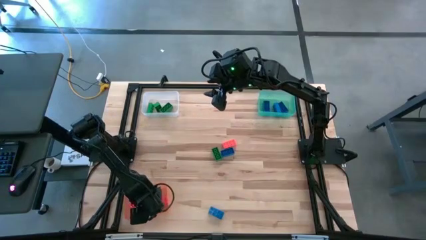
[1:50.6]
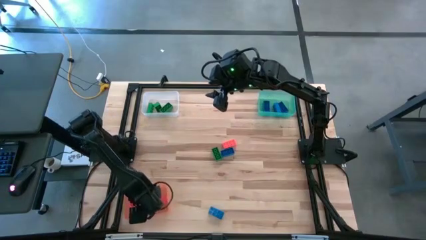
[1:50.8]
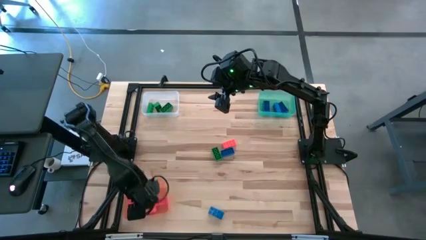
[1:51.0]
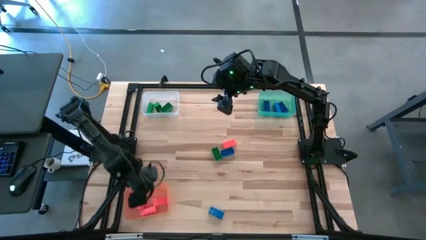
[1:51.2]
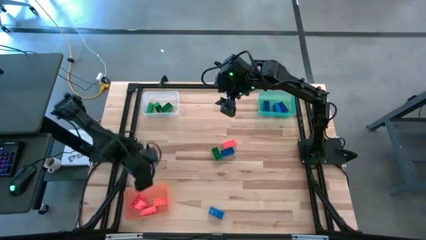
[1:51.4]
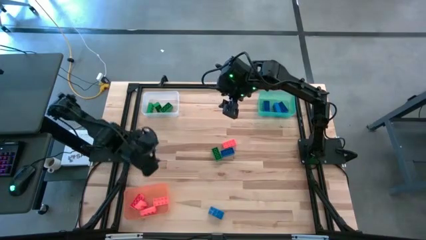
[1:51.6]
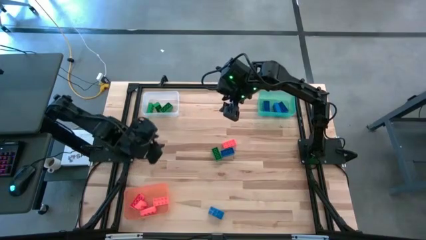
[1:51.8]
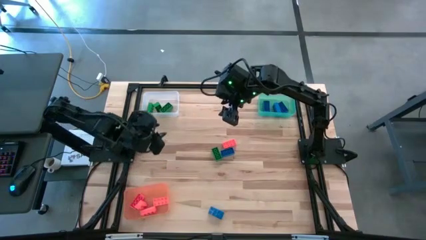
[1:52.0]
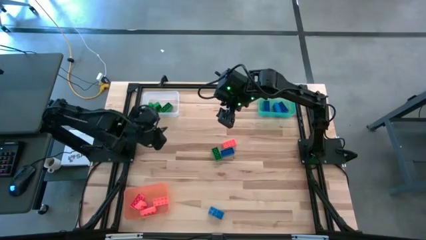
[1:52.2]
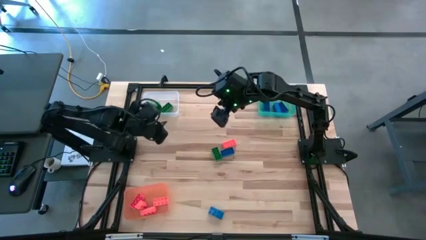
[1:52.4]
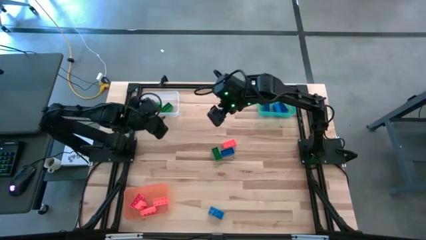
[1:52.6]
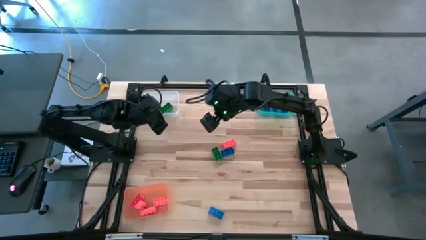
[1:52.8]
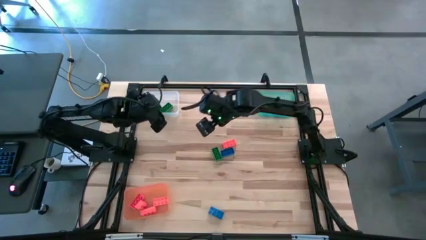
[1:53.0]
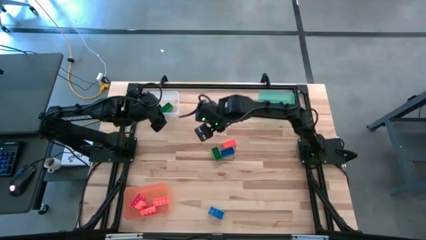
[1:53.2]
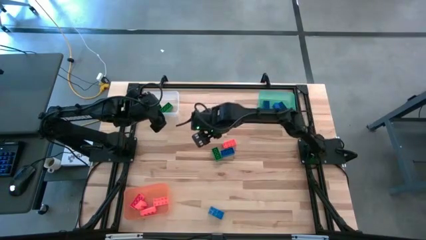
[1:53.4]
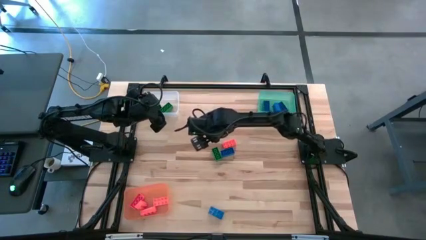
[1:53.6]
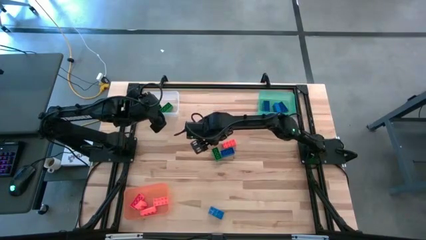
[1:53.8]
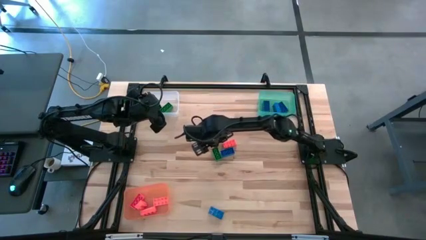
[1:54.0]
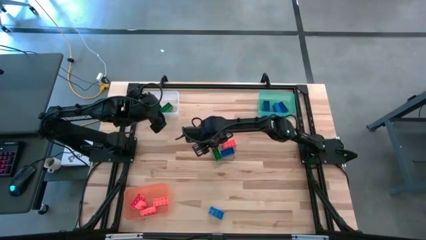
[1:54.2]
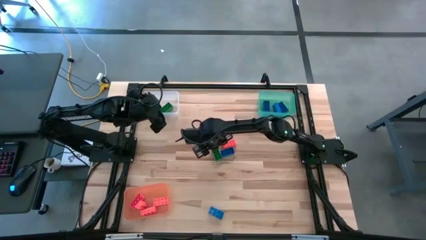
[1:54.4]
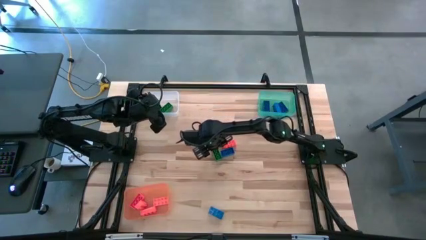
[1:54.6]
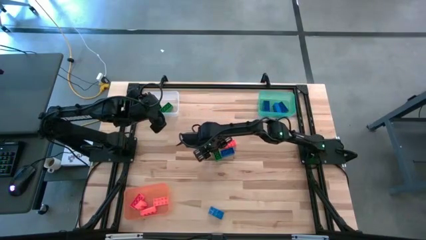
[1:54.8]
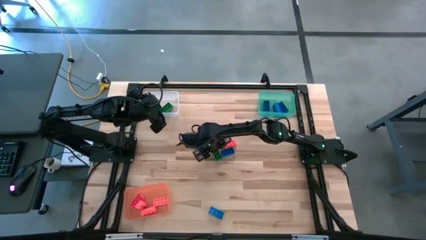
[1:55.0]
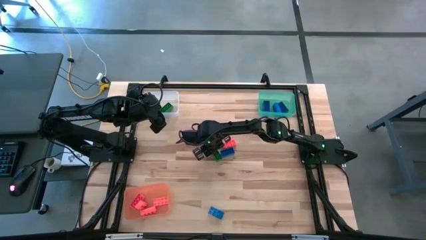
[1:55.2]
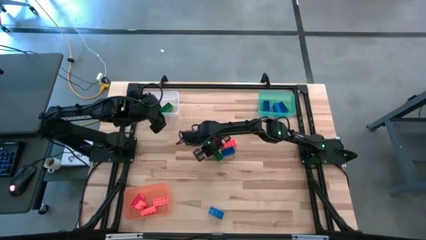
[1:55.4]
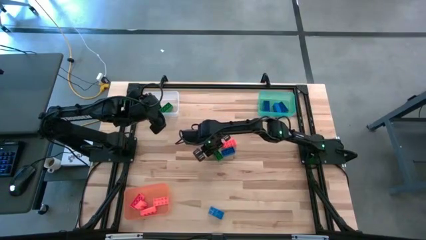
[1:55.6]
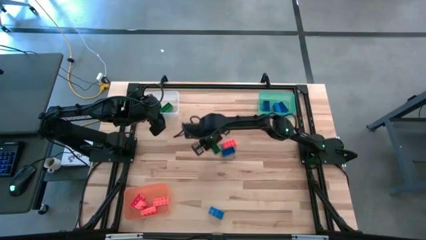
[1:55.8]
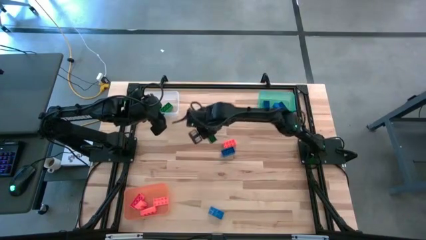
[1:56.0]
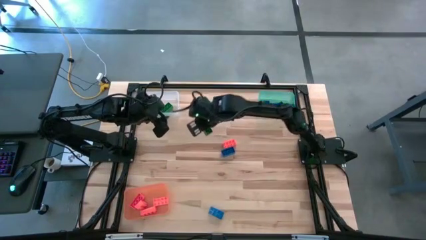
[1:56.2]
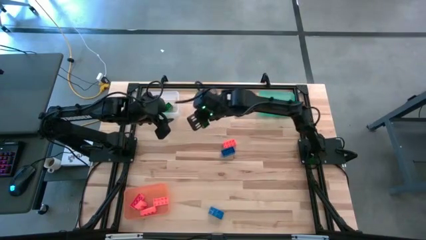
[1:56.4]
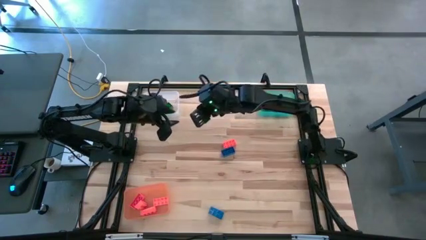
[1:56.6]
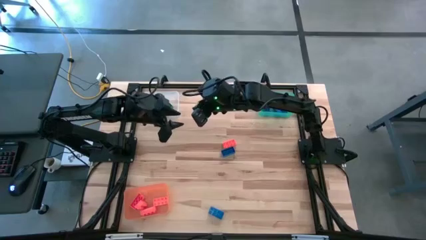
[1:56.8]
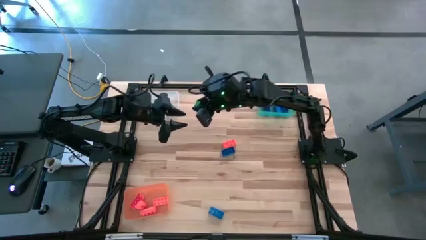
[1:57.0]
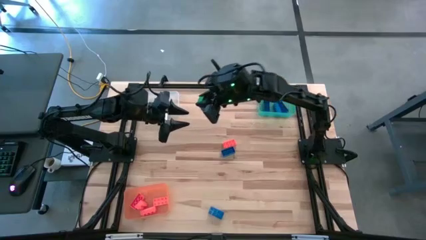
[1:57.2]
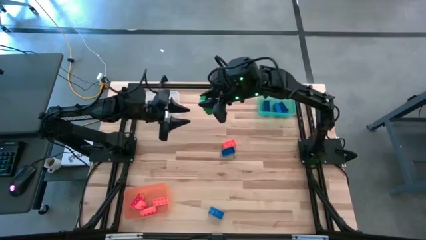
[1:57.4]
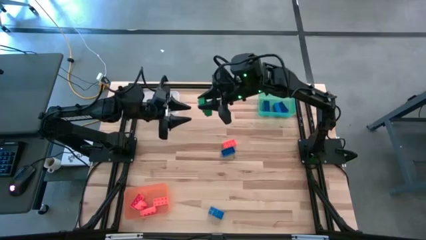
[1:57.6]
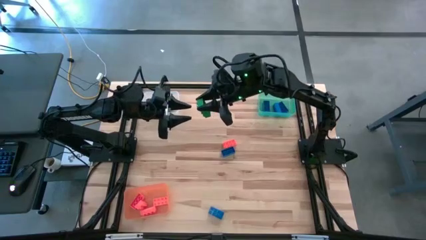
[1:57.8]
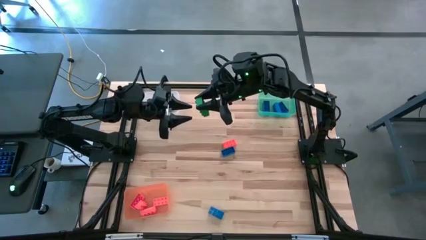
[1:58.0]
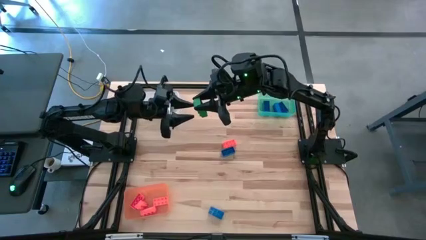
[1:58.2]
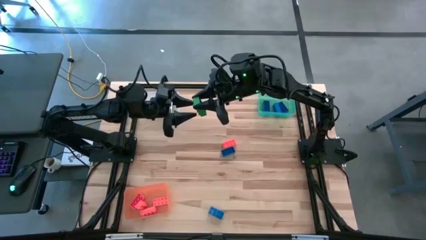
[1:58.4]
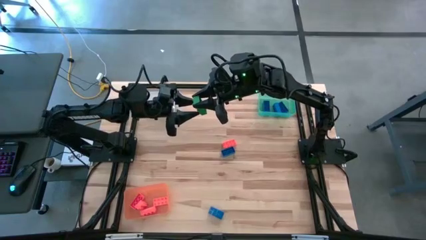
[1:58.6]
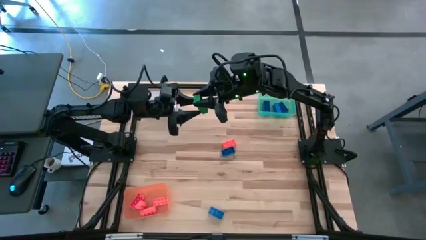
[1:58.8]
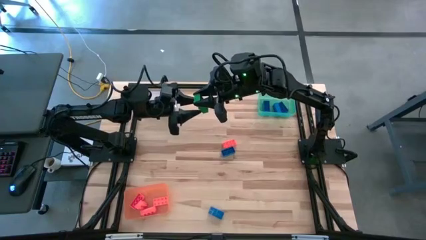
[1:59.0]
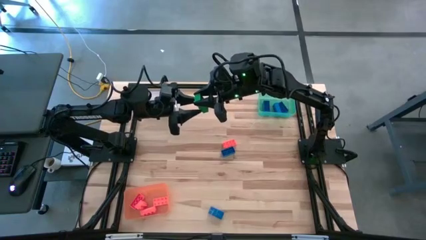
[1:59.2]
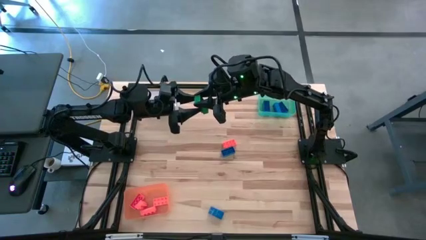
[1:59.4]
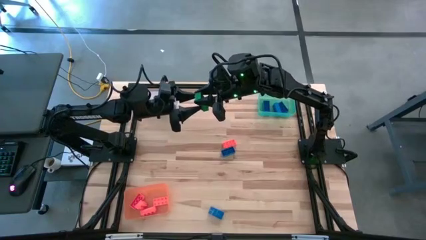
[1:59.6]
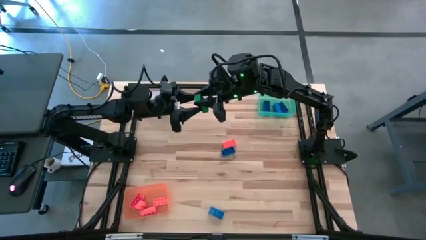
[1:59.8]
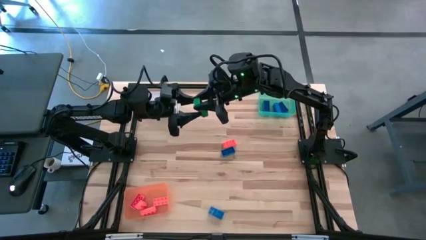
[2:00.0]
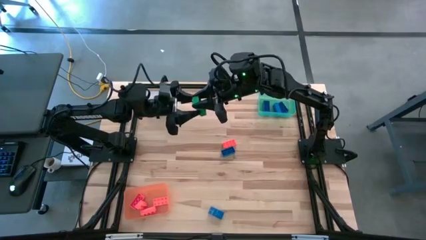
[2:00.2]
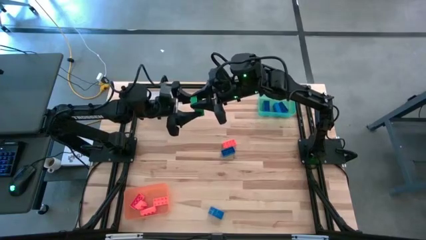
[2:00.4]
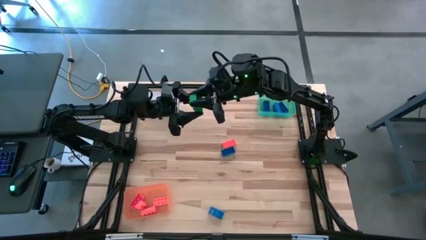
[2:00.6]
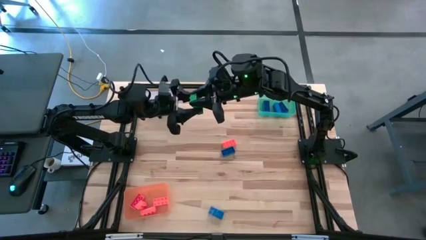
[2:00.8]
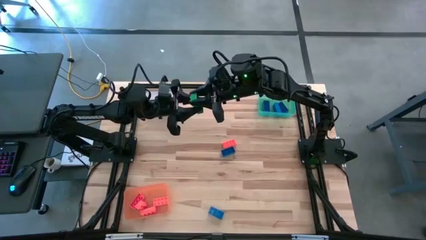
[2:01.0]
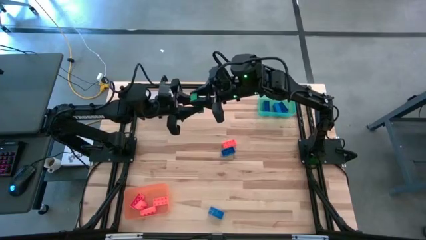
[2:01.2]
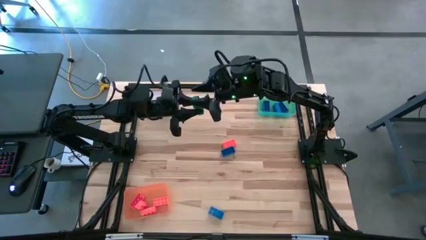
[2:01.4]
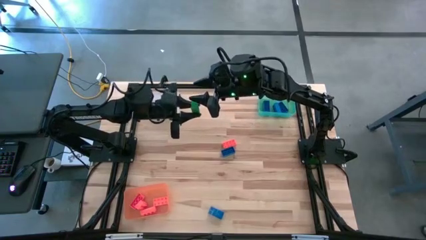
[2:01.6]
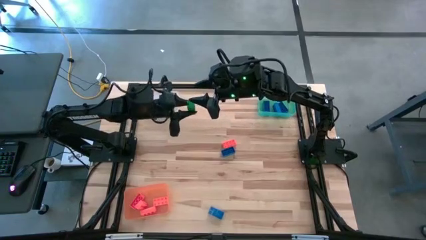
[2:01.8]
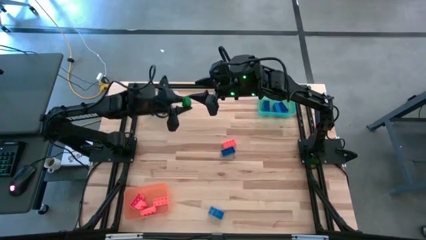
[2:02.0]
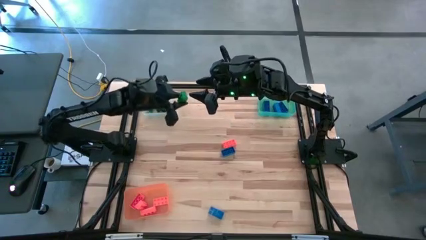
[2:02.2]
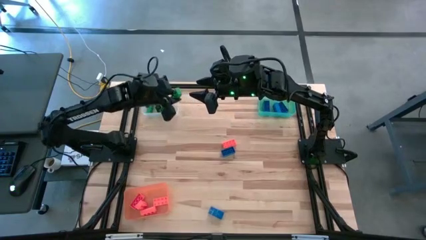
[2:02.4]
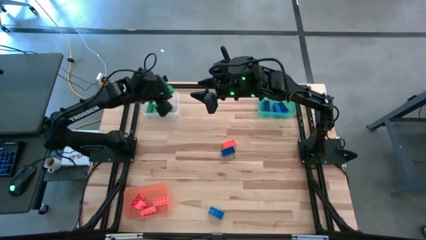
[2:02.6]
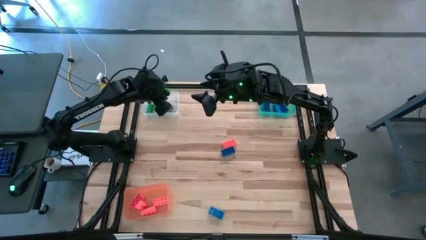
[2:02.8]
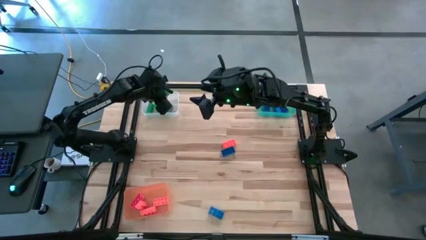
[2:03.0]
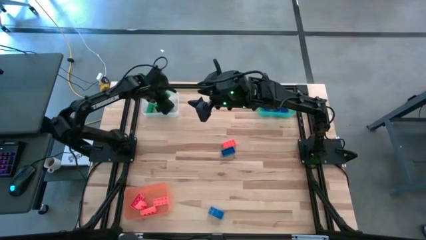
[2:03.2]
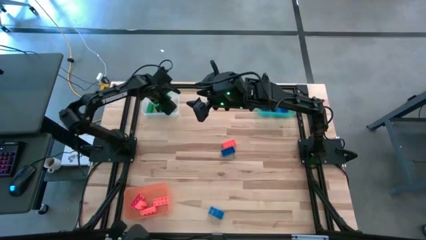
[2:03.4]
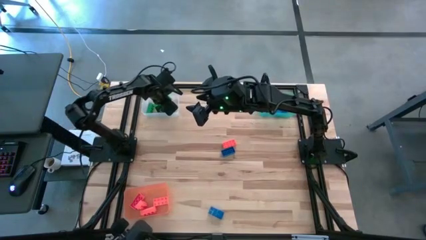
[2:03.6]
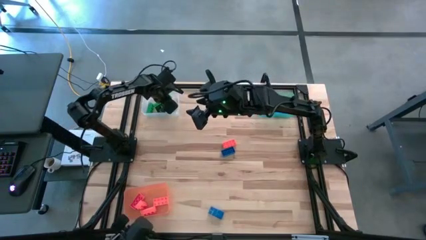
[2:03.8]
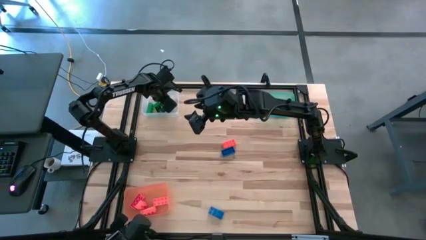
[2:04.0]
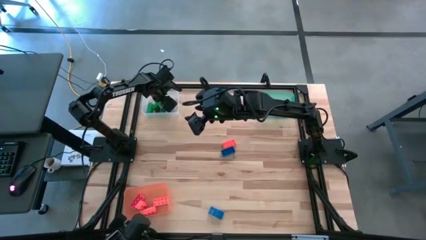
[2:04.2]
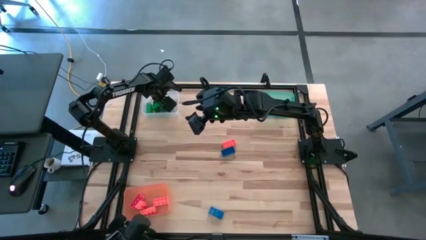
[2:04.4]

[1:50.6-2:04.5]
Task: Sort & place blocks by color
Put the green game piece into the transparent bin

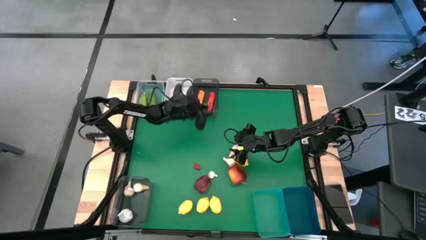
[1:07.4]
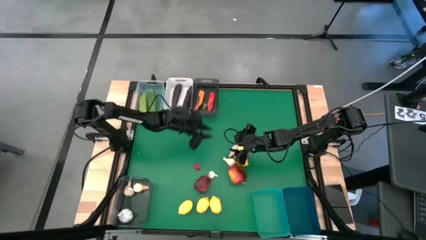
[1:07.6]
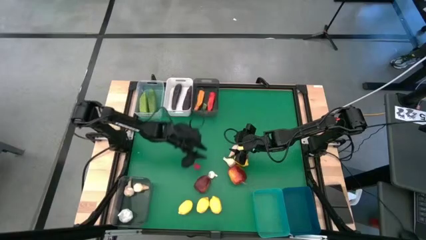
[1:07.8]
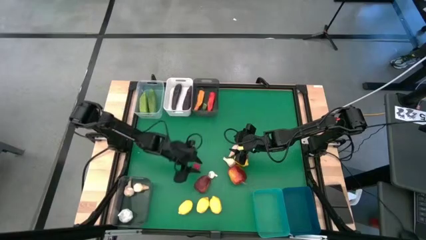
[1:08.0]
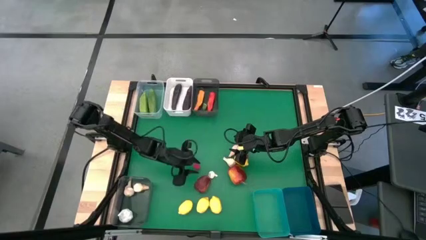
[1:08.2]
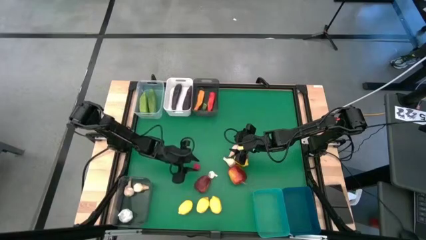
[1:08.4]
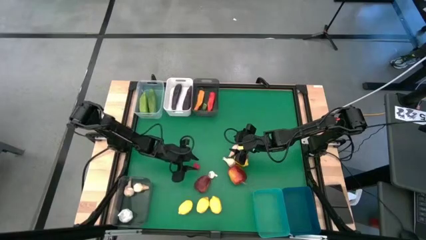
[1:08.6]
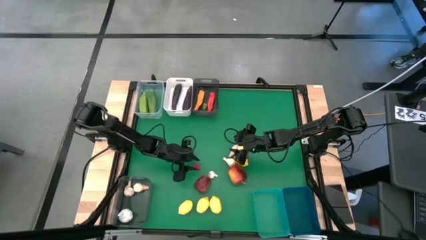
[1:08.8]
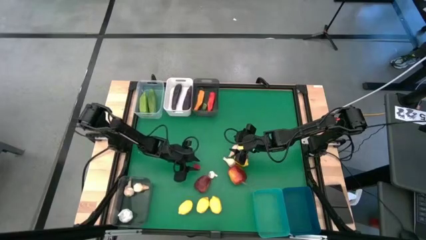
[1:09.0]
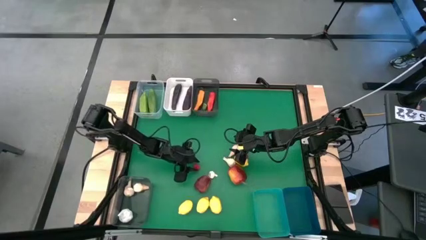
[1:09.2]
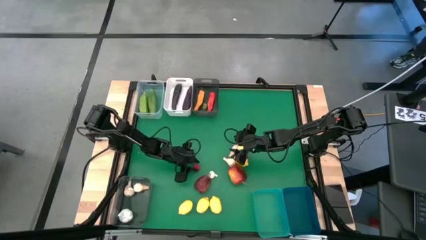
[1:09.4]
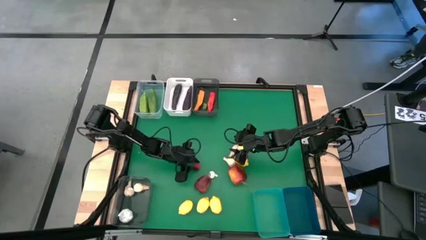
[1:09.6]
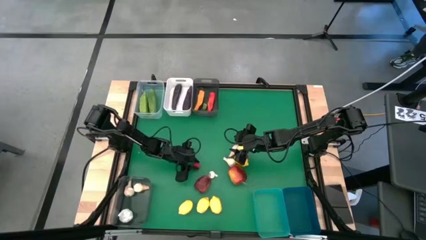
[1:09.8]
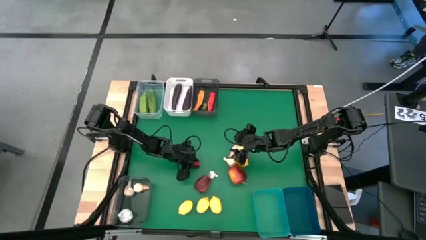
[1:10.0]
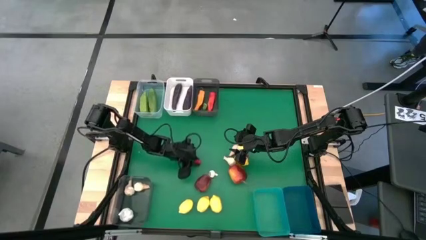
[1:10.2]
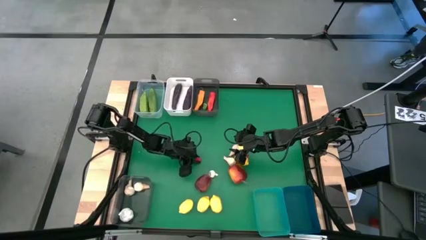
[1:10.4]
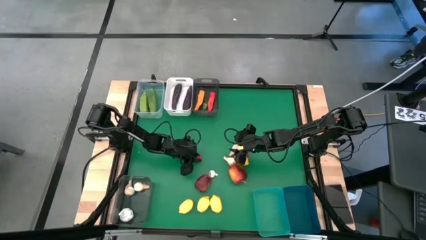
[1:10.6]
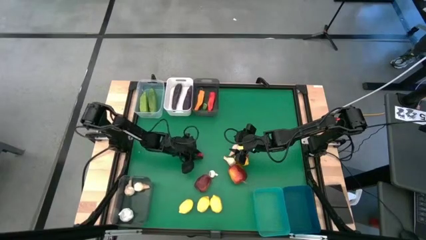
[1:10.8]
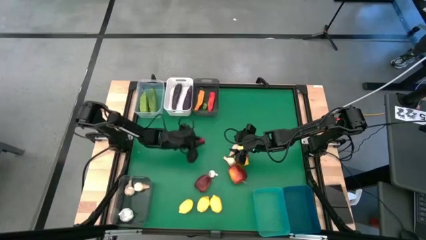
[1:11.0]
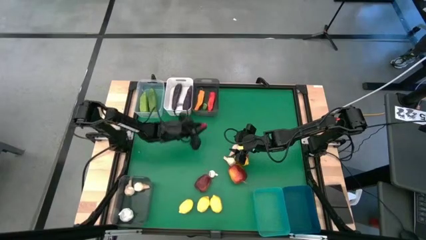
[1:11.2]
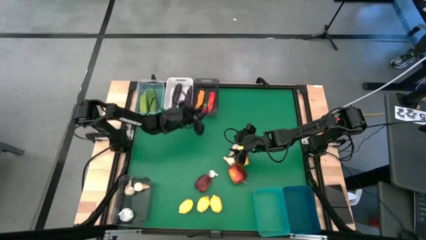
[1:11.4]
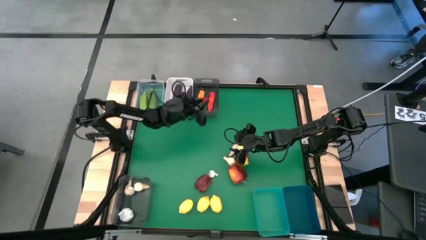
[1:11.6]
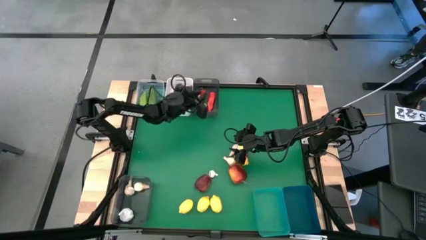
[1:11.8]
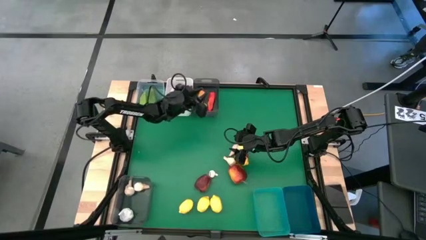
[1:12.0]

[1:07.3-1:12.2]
Task: Sort produce into baskets
Put the red chili pepper into the top black bin
